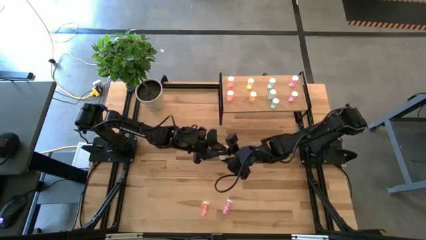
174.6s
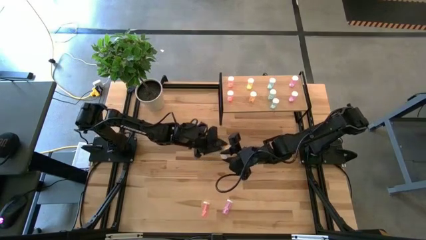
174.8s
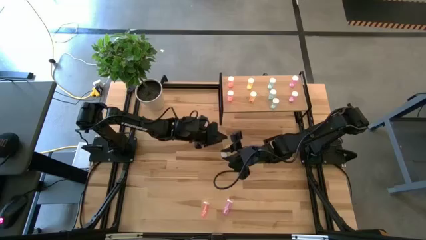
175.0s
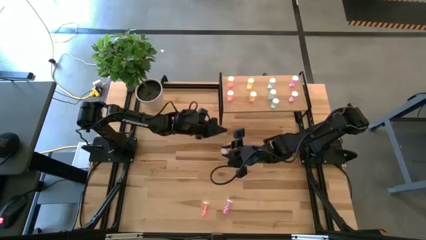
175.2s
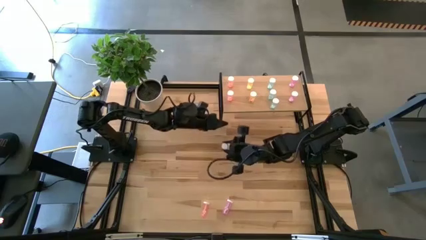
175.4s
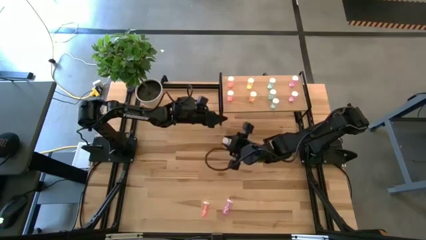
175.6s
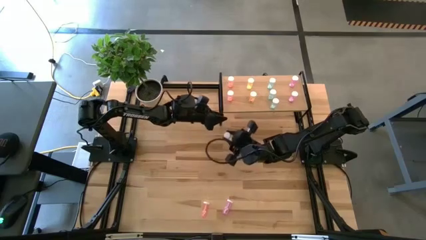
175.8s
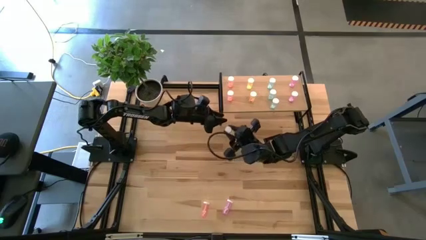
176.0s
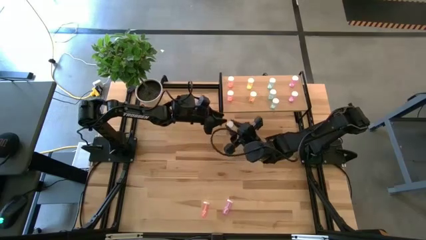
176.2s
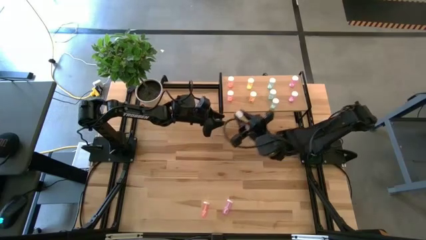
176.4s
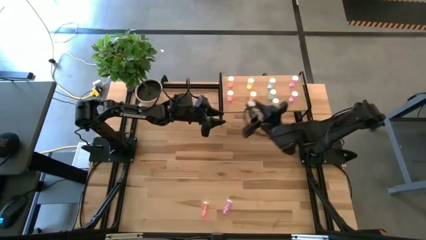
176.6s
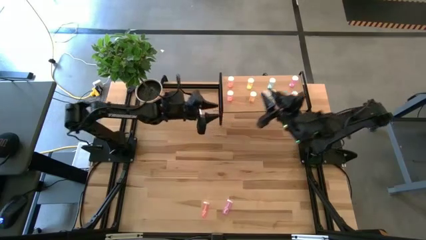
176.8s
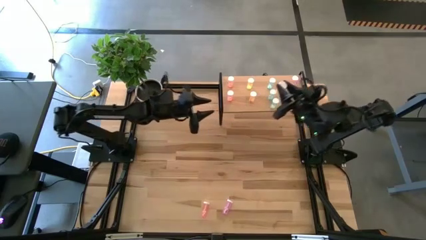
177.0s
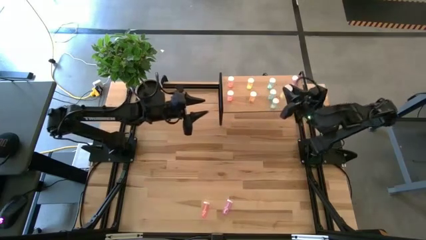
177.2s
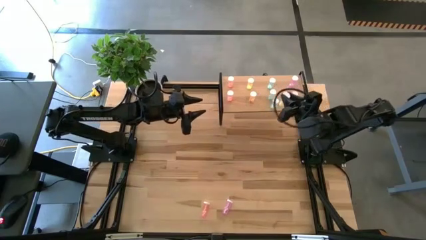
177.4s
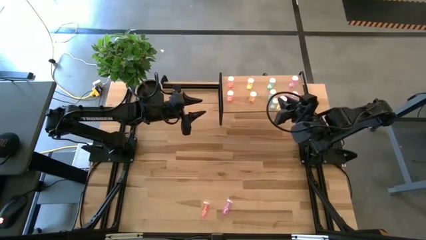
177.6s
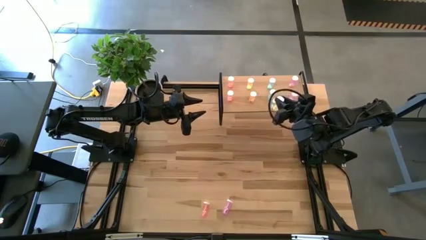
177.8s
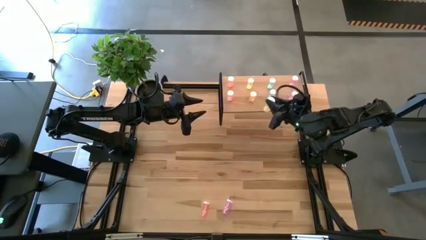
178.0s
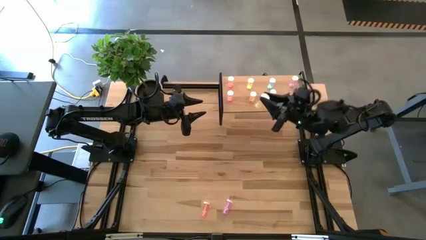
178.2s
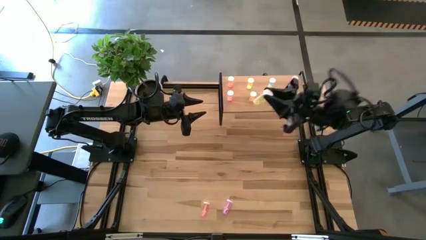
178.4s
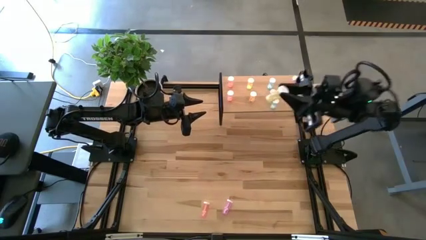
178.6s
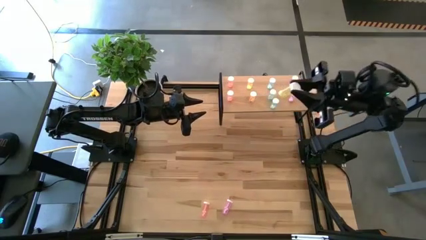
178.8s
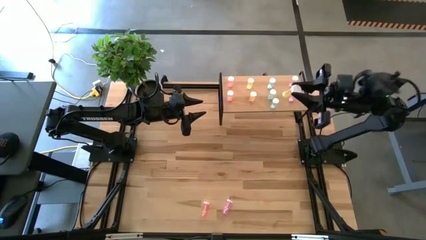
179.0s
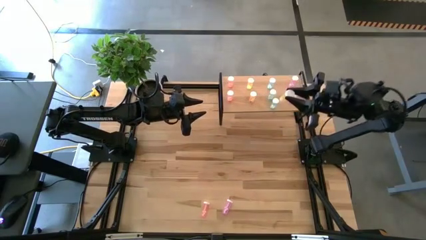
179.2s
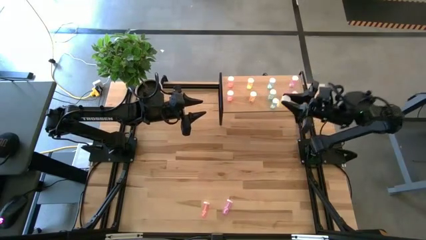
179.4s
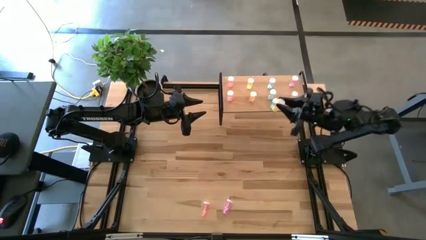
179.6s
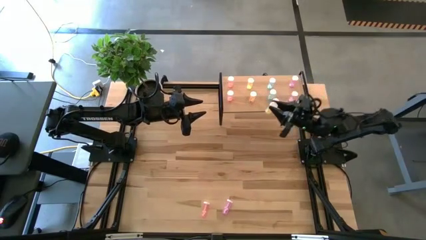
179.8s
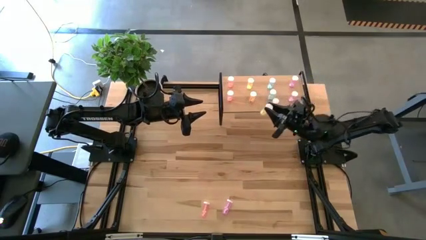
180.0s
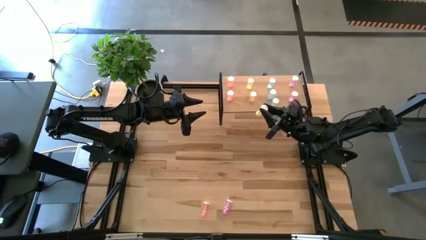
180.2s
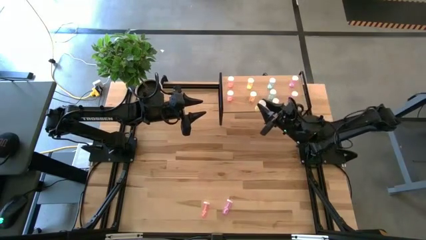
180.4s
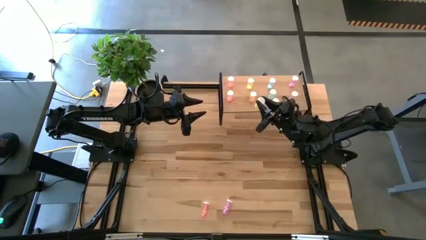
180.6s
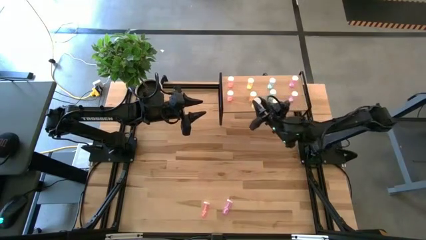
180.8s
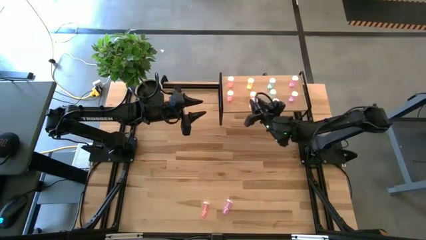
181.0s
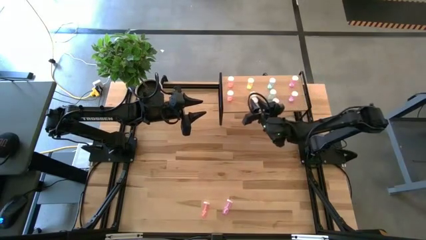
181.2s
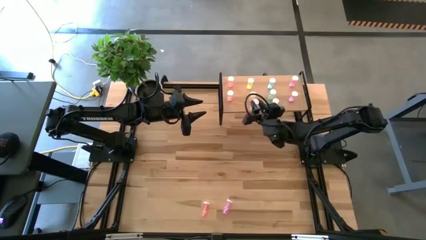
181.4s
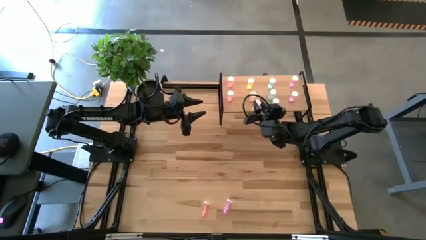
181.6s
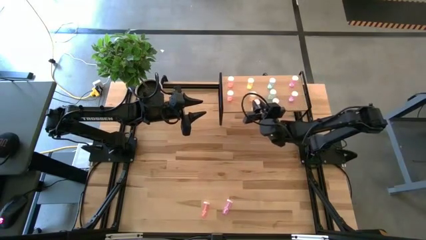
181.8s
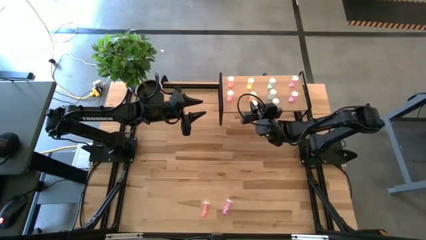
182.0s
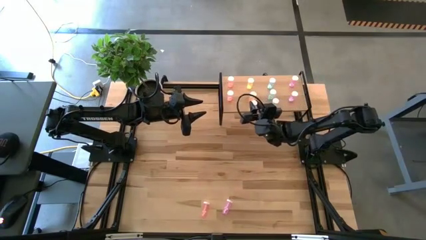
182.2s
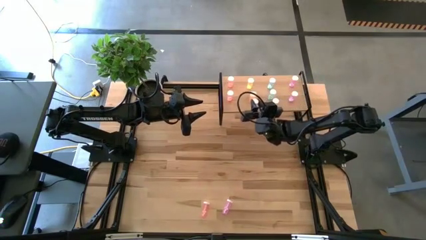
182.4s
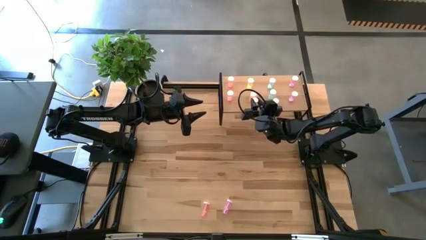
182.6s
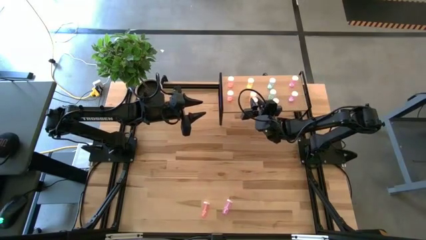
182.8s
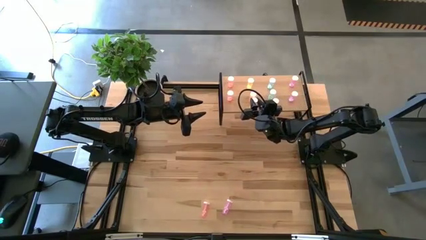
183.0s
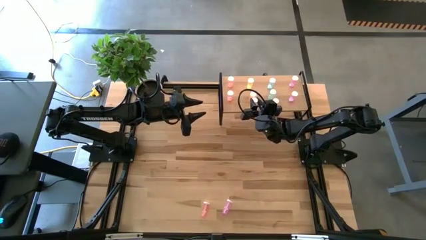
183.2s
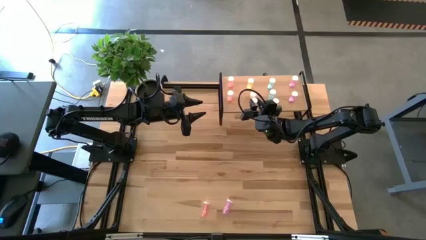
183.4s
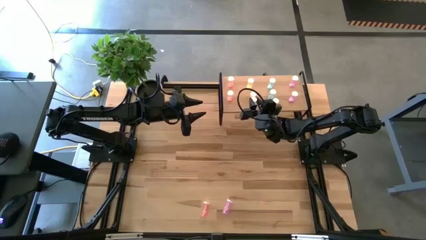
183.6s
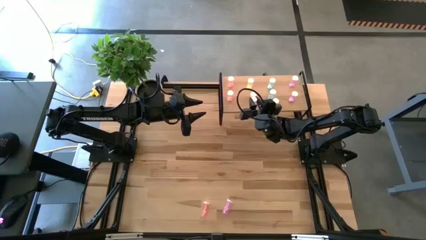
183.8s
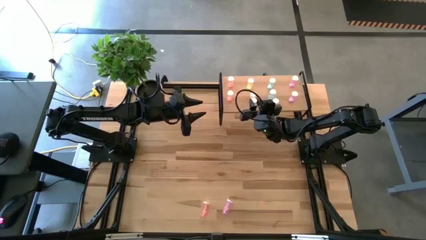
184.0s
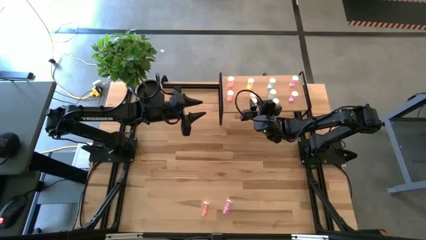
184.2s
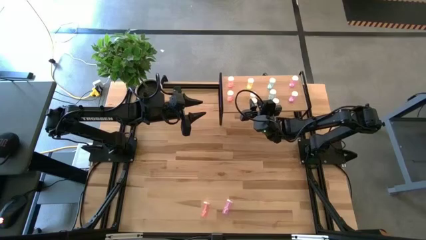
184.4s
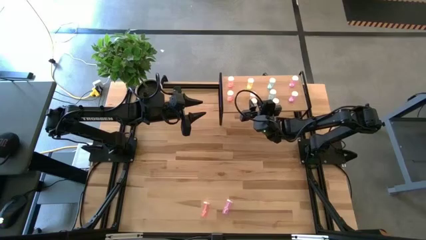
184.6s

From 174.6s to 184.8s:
Task: Pick and place medicine bottles onto shelf by color
Put the yellow pill bottle on the shelf aligned with the other yellow pill bottles

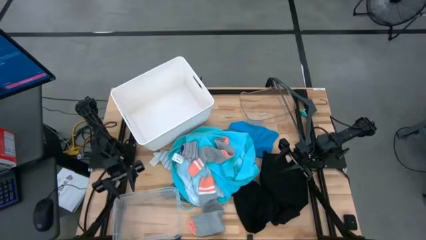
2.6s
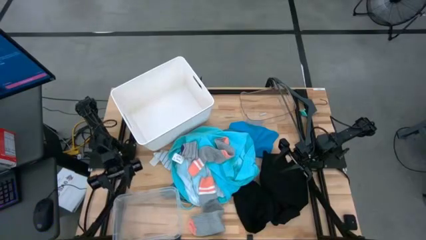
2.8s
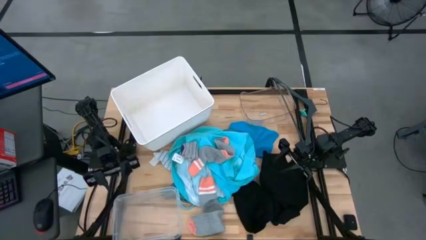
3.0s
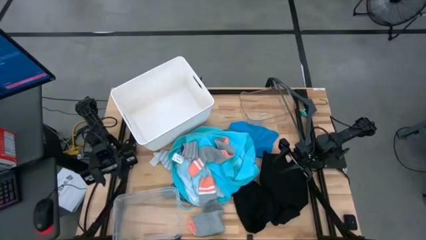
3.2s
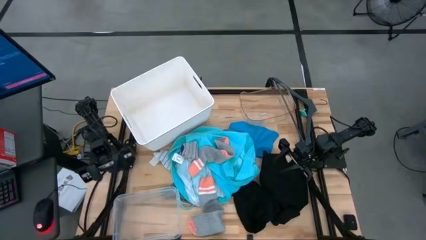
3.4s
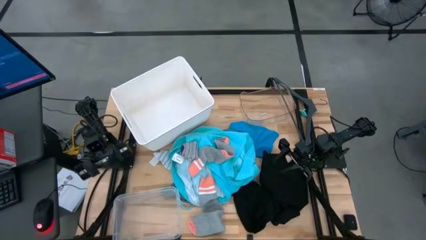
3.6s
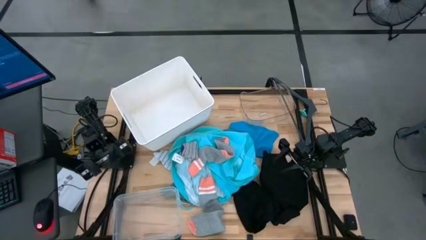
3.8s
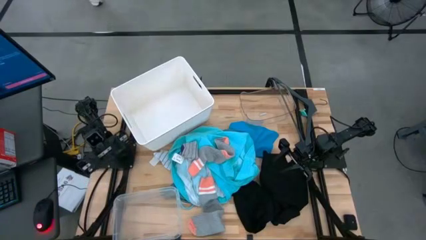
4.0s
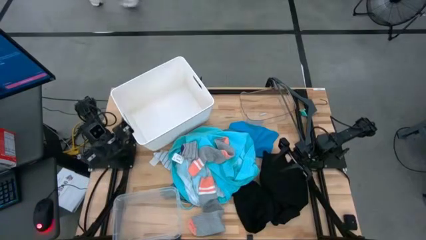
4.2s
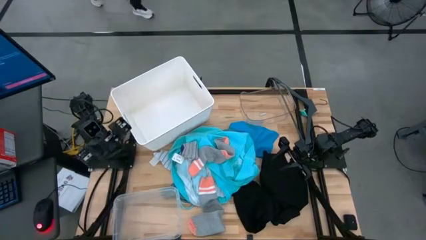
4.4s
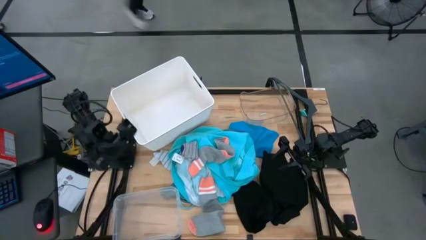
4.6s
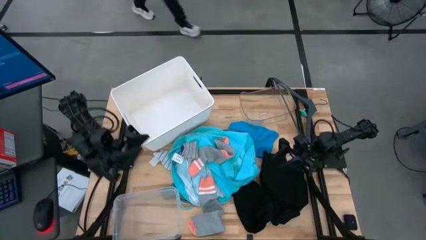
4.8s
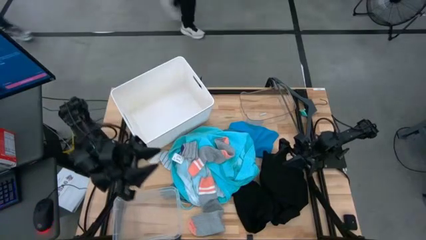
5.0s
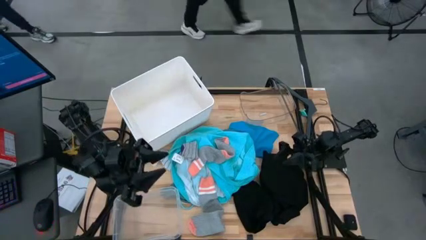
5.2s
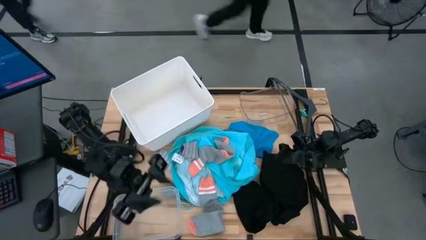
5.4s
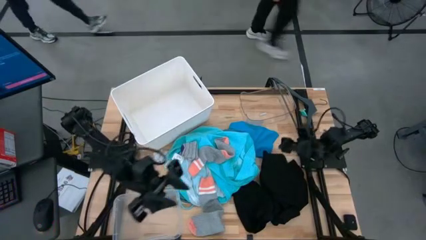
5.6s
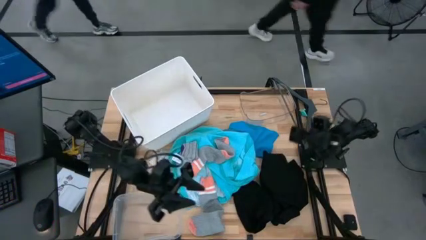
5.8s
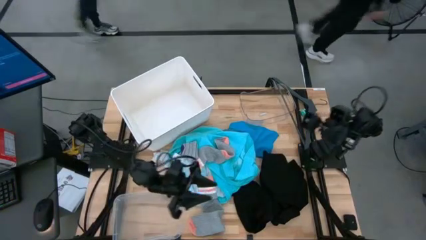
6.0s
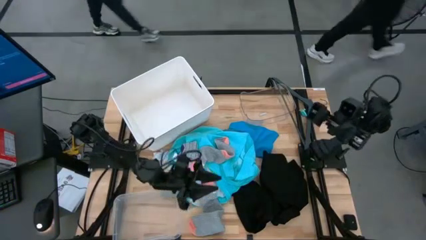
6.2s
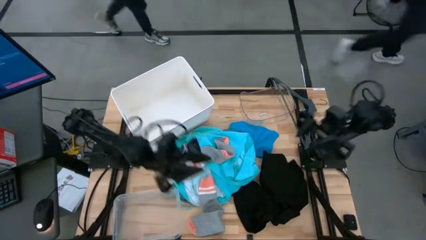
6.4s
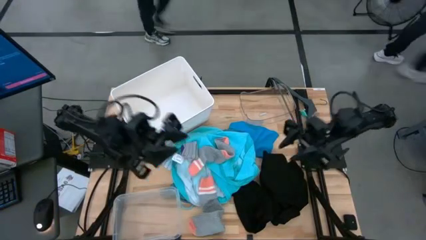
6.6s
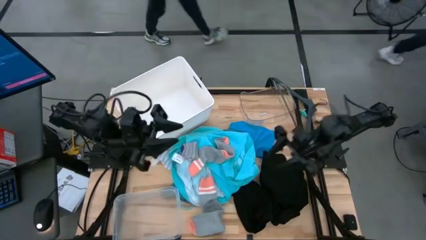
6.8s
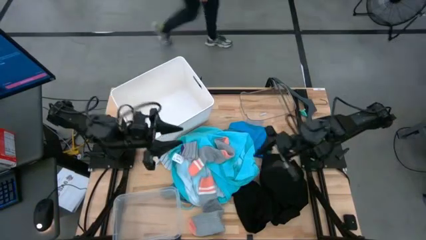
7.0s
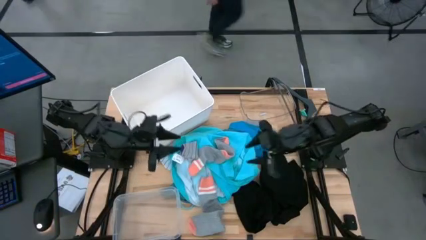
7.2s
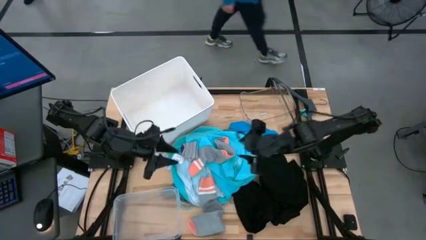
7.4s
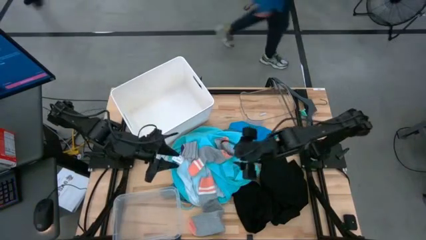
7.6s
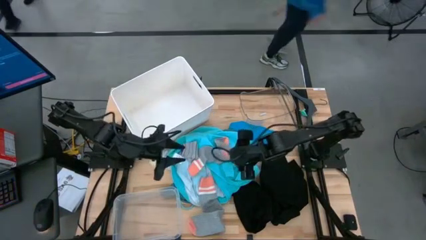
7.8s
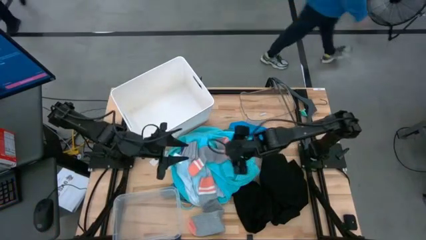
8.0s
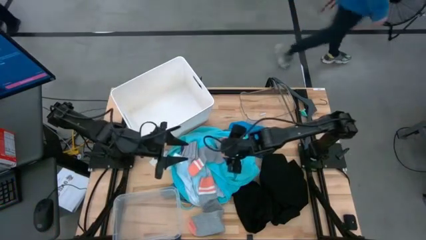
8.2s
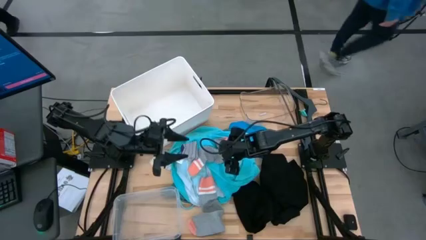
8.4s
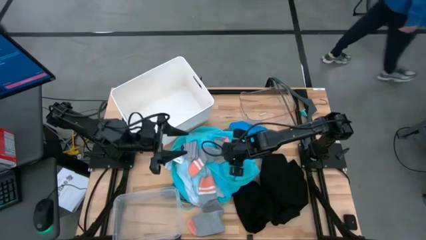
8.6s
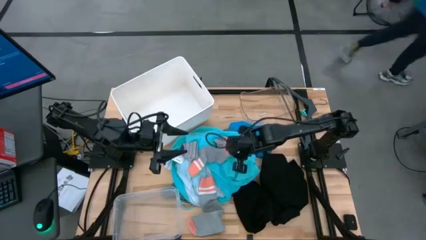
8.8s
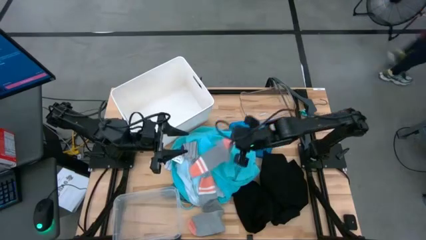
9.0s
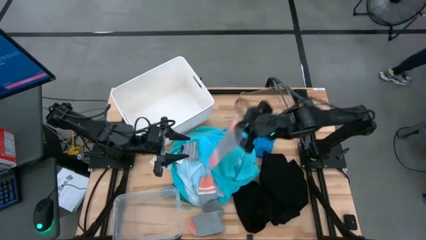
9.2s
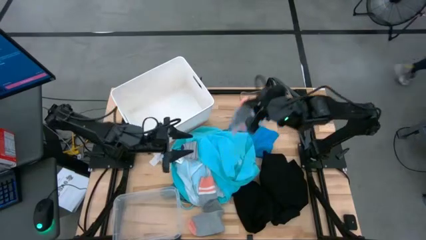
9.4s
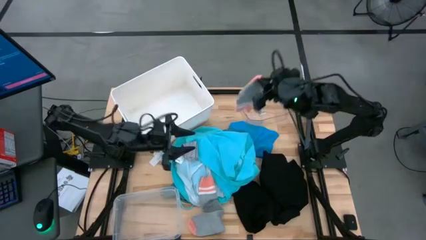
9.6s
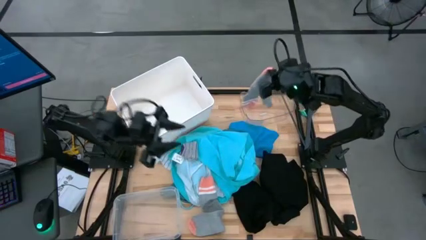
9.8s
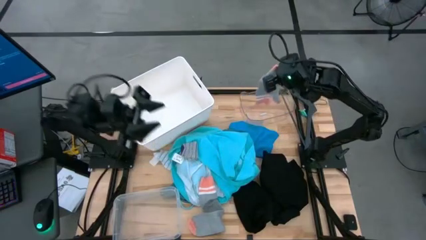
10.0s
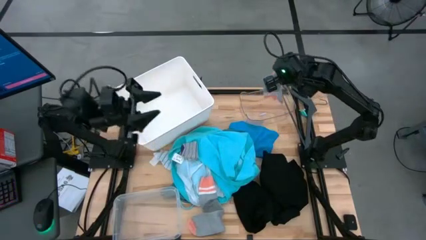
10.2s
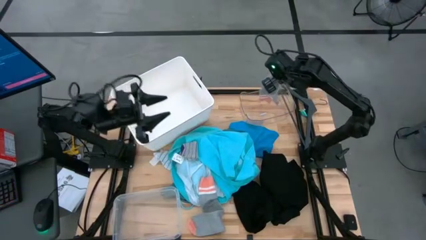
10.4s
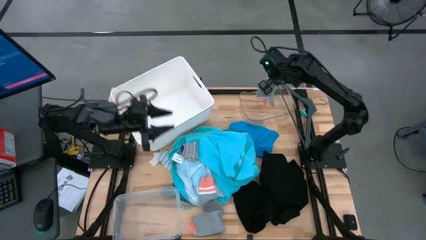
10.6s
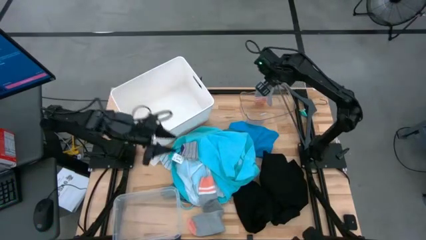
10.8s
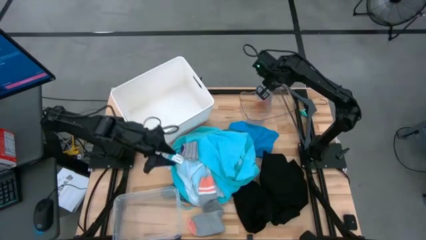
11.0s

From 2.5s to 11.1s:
Task: Pick & Place Cloths
Put the gray and pink sock into the top transparent bin
